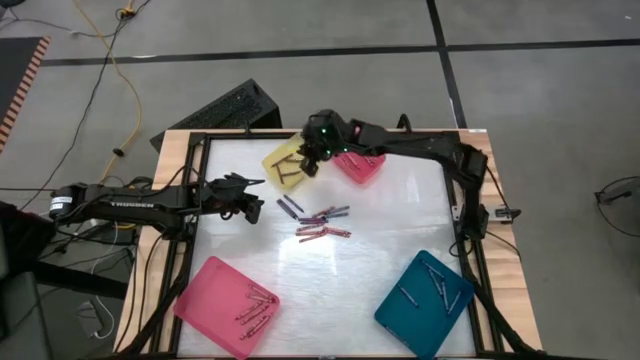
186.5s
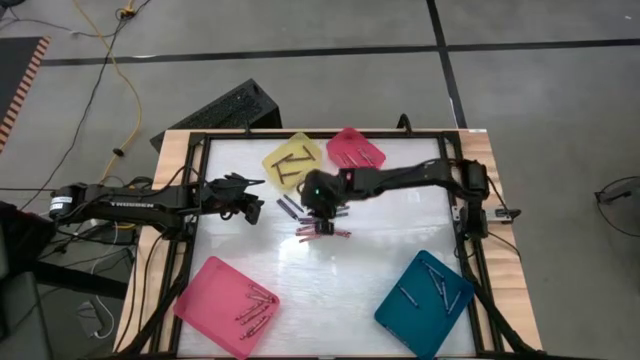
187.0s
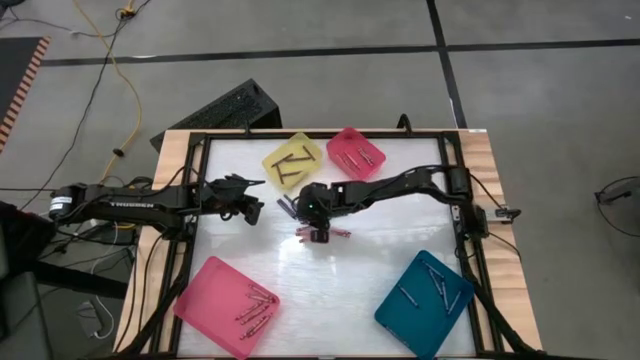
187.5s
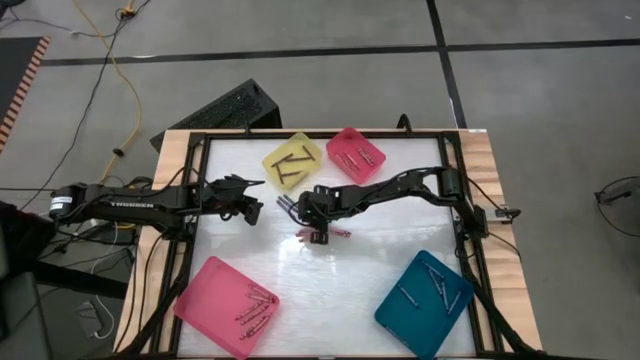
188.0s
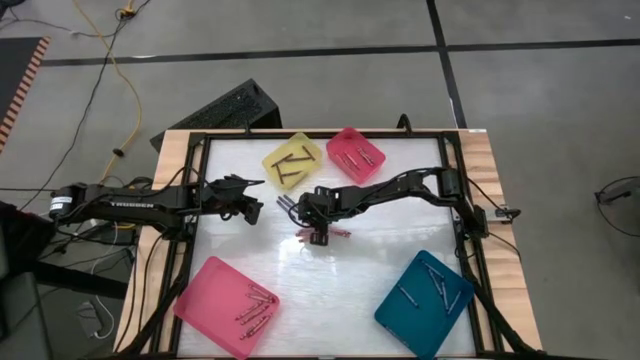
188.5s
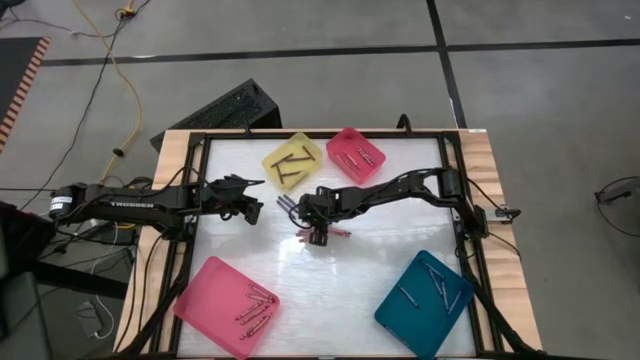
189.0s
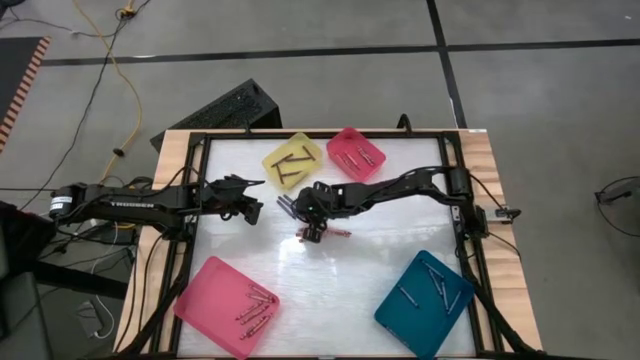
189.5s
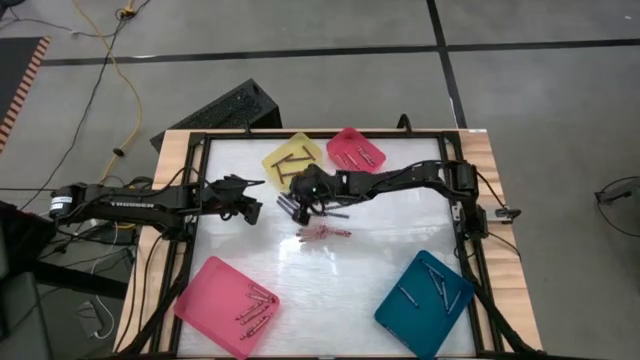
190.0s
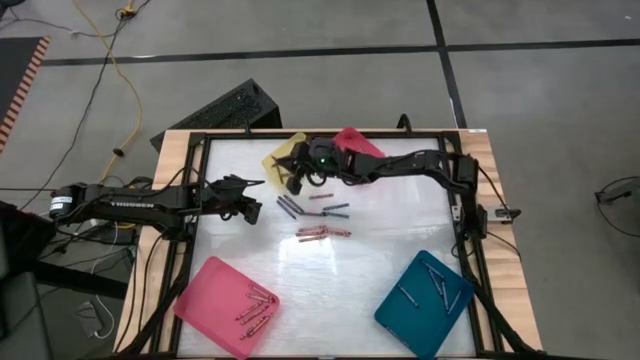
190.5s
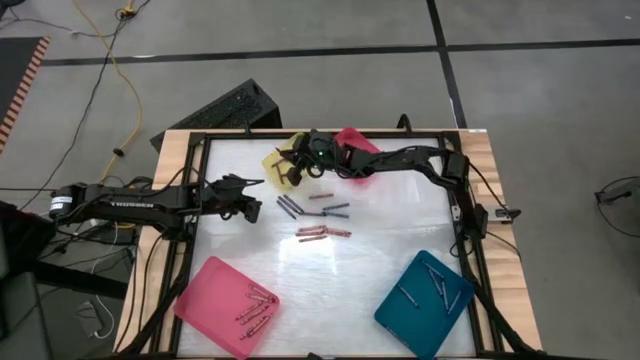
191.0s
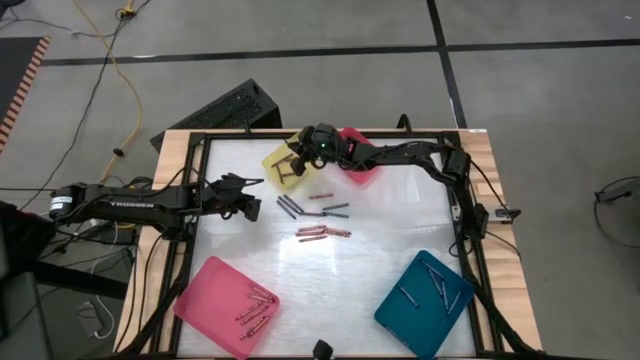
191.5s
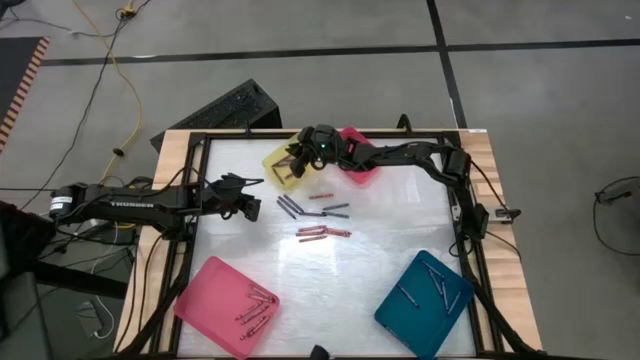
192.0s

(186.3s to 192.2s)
Task: Sort crayons
Put the purple crayon into the yellow bin

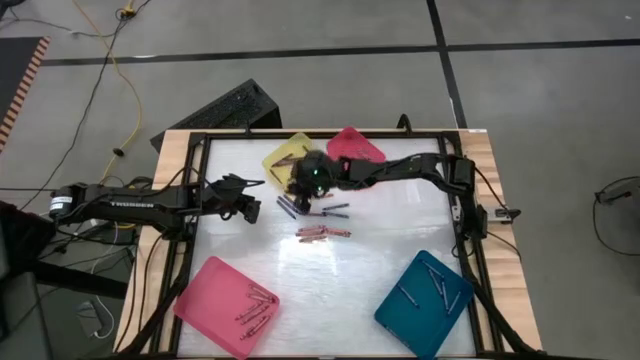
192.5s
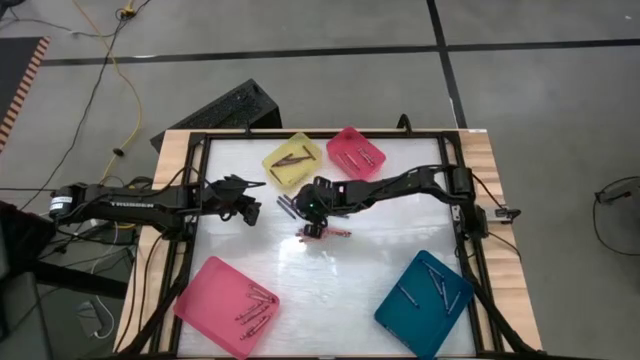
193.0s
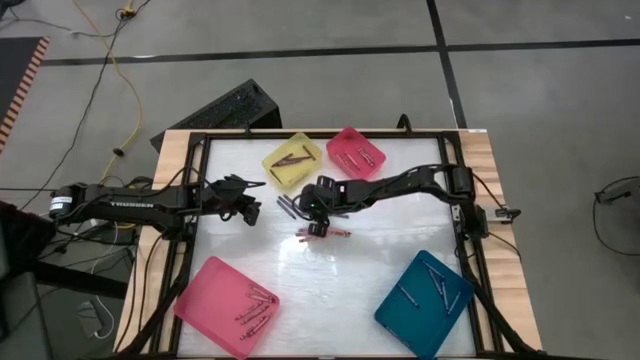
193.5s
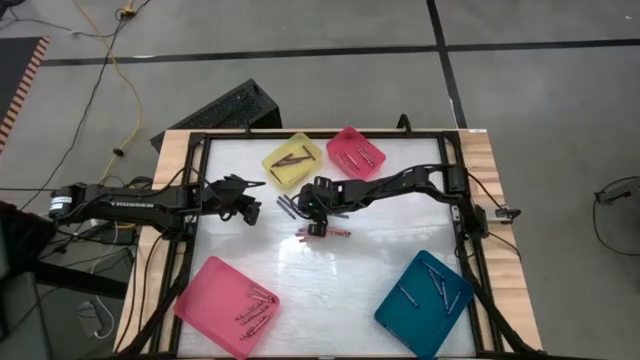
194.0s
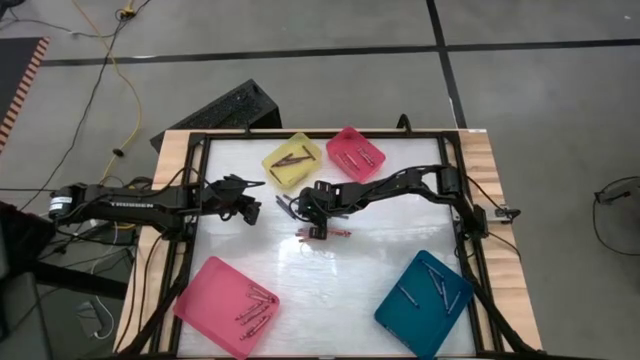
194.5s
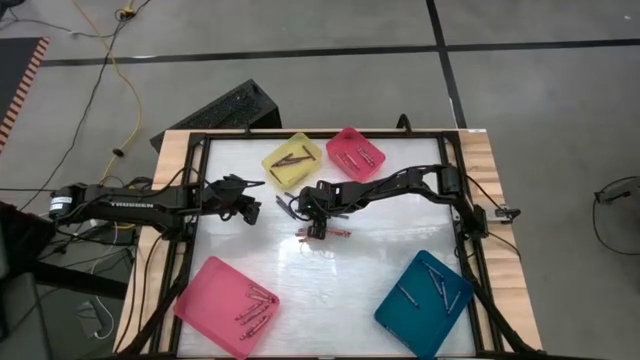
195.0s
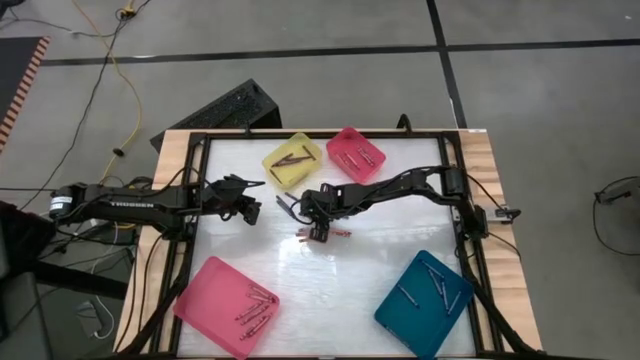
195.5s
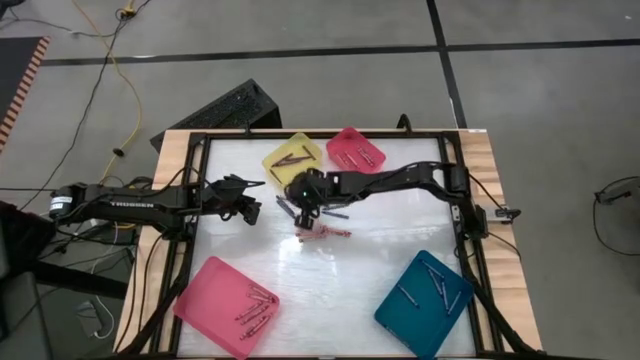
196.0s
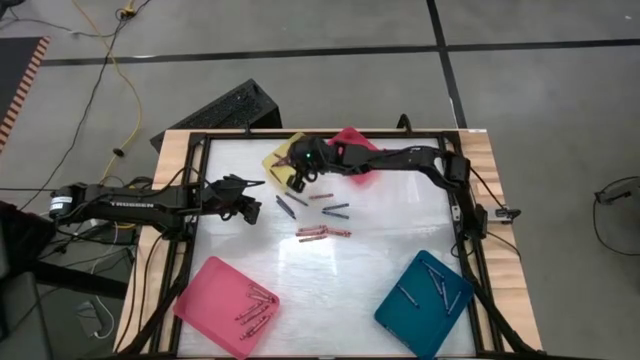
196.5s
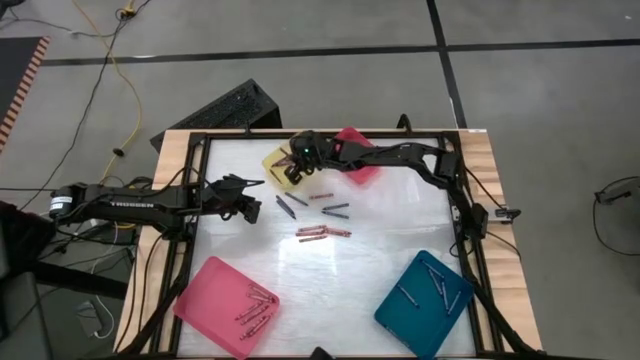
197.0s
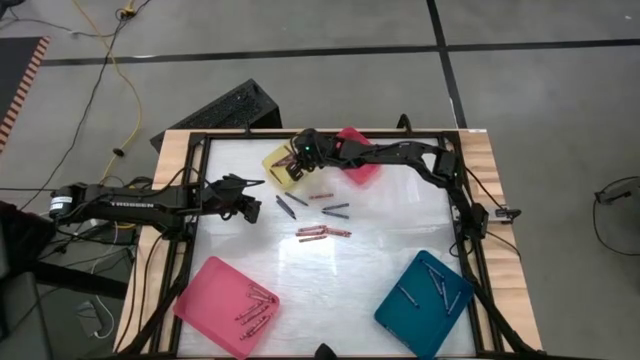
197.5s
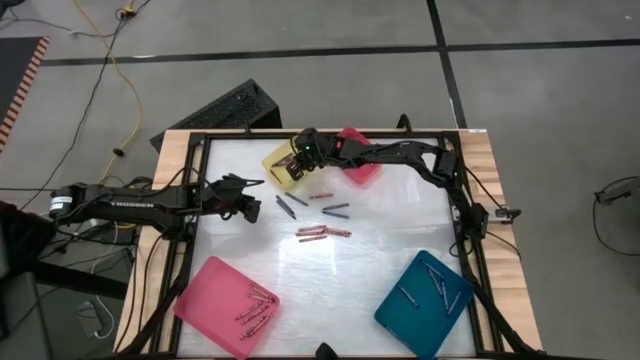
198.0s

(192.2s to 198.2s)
Put the purple crayon into the yellow bin

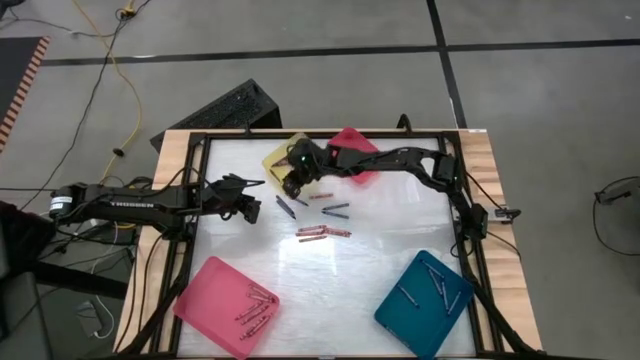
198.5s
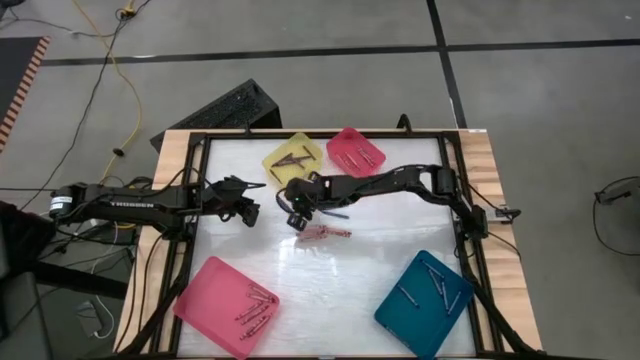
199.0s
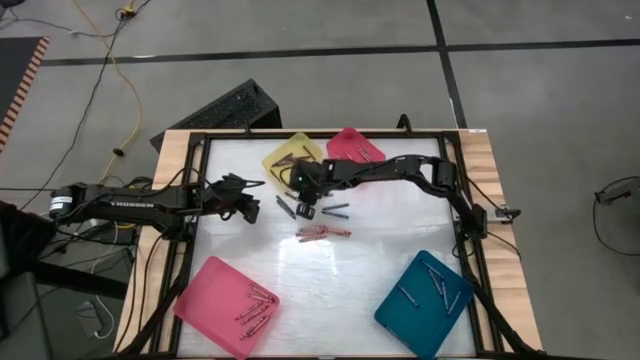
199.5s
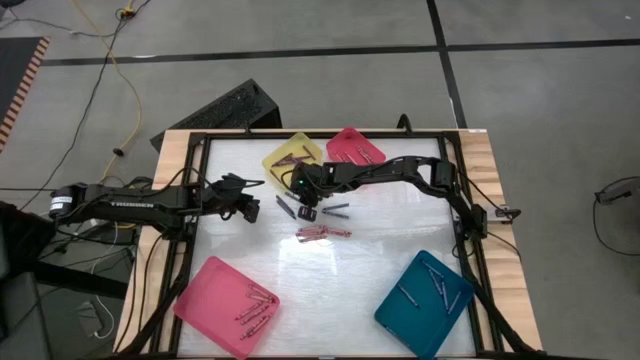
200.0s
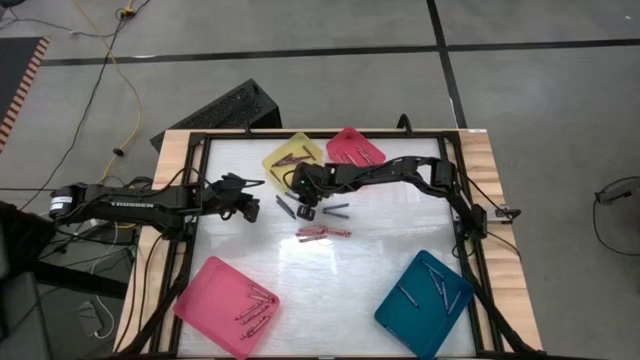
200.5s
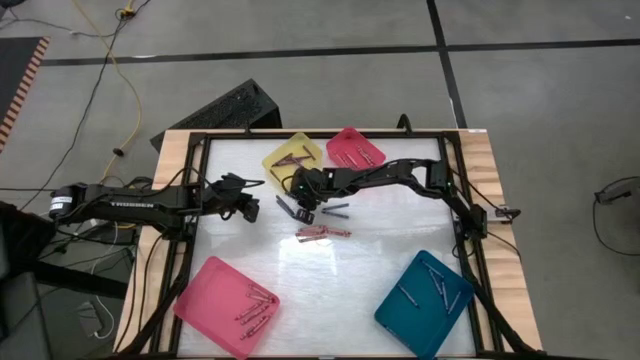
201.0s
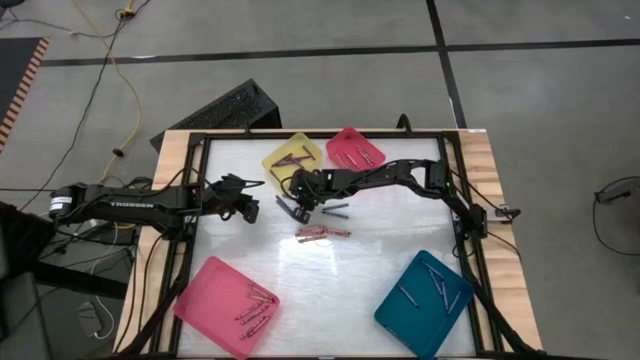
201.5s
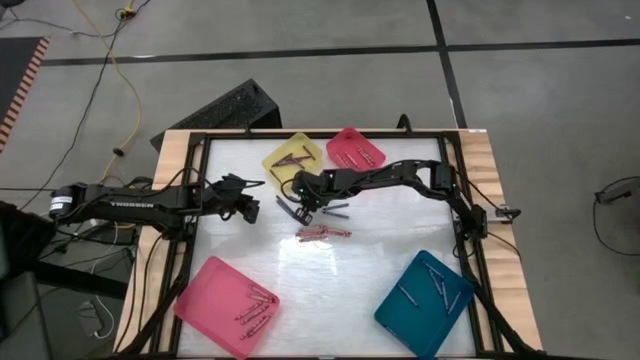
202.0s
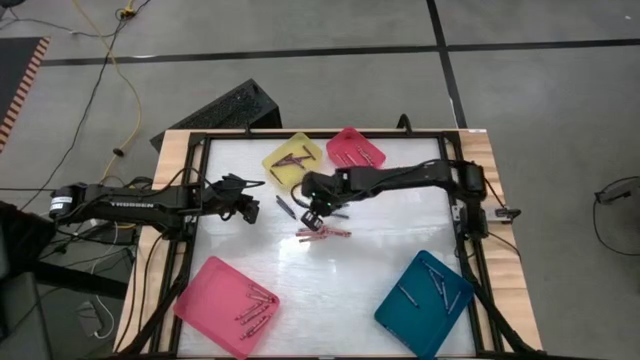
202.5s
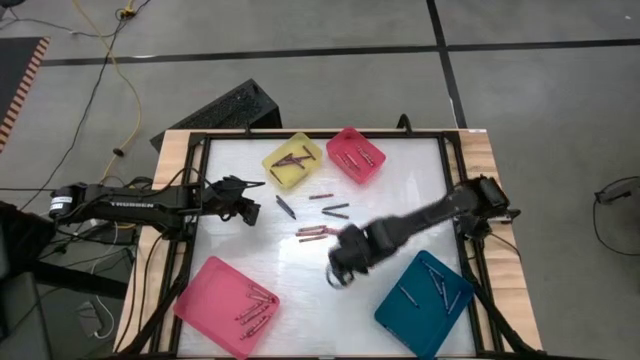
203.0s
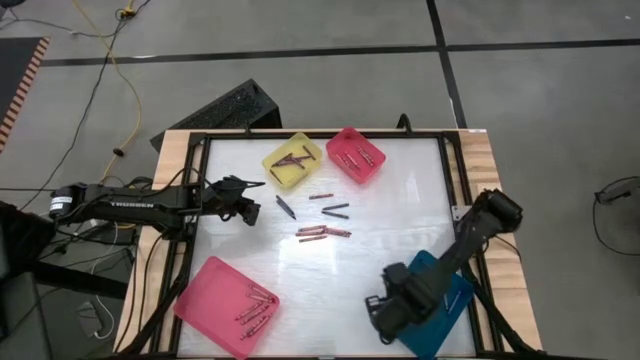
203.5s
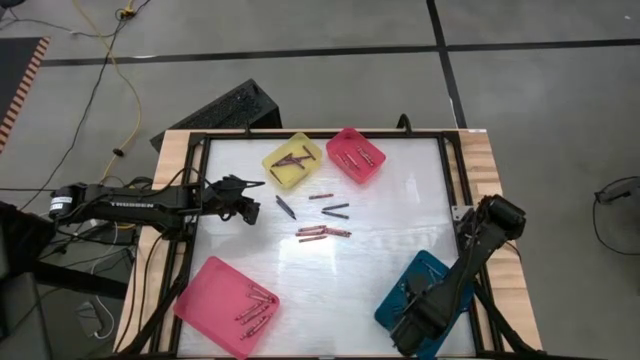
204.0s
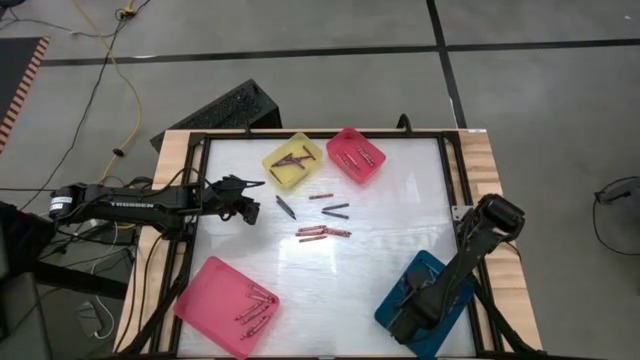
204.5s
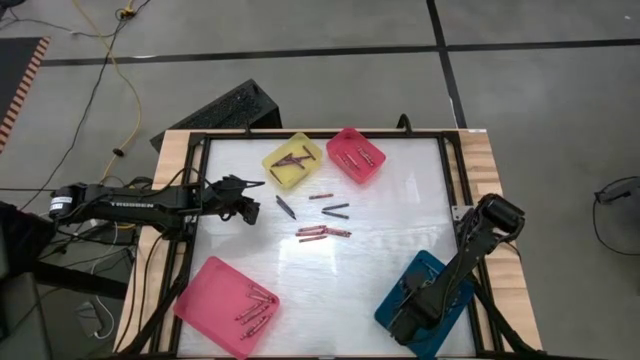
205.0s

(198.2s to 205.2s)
Put the blue crayon into the blue bin

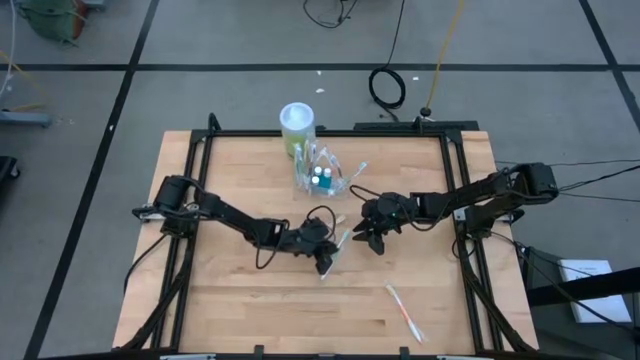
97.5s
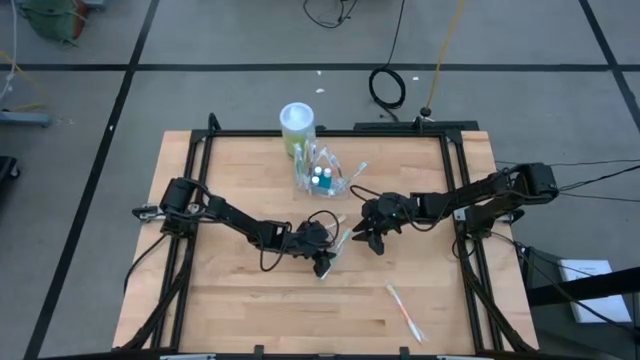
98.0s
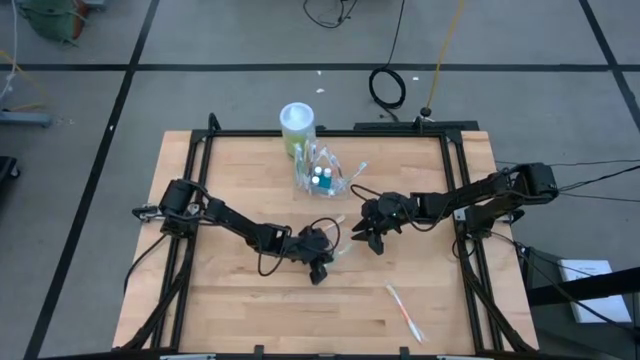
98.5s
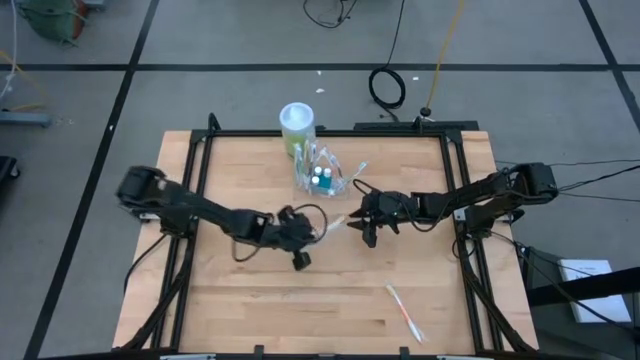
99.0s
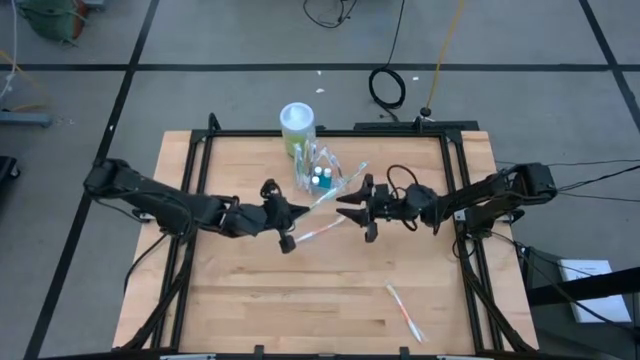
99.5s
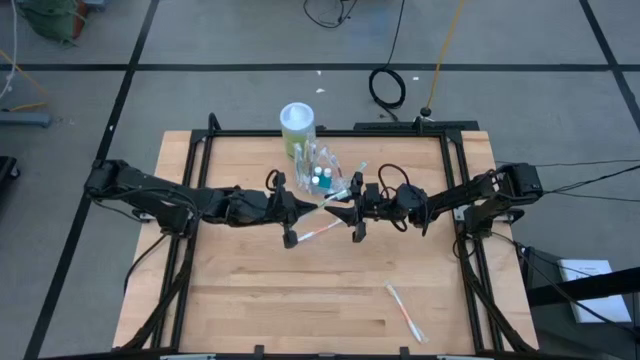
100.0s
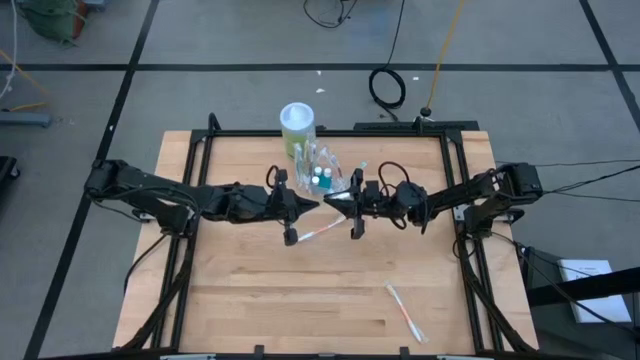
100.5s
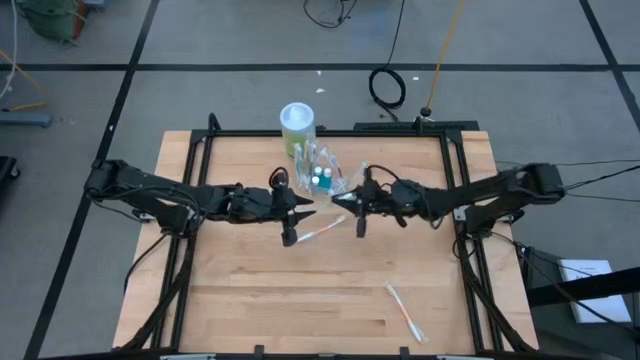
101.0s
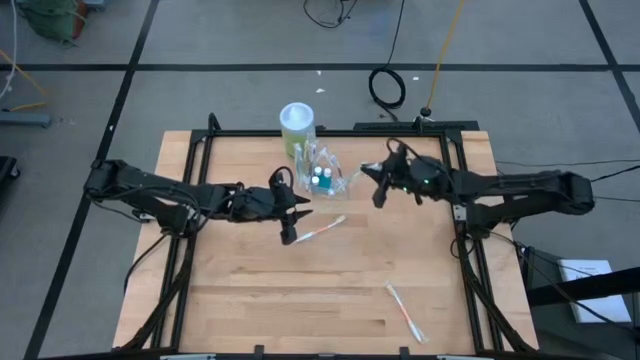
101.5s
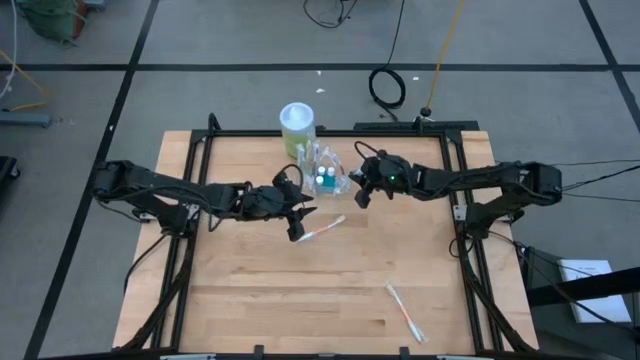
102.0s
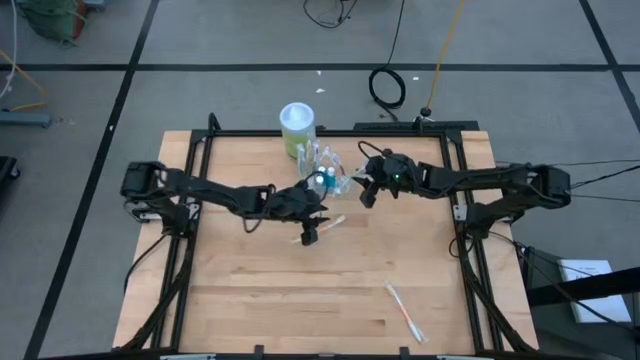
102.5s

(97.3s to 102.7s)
Task: Pick & Place toothbrushing station
Put the green toothbrush into the right of the transparent organizer
